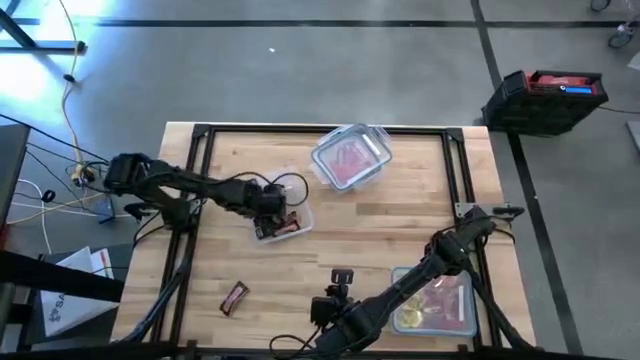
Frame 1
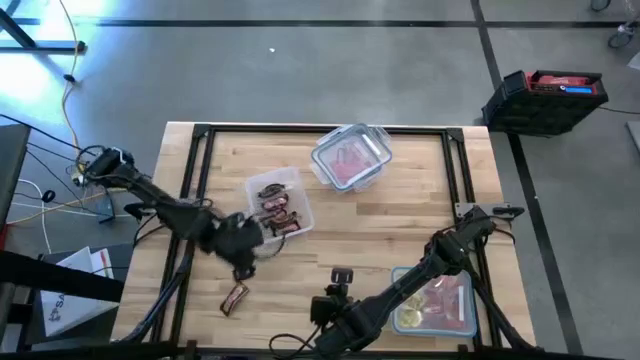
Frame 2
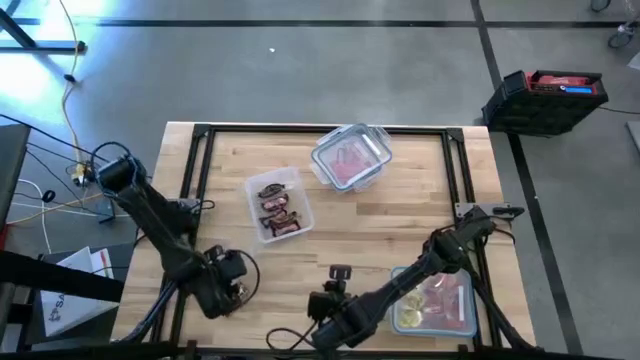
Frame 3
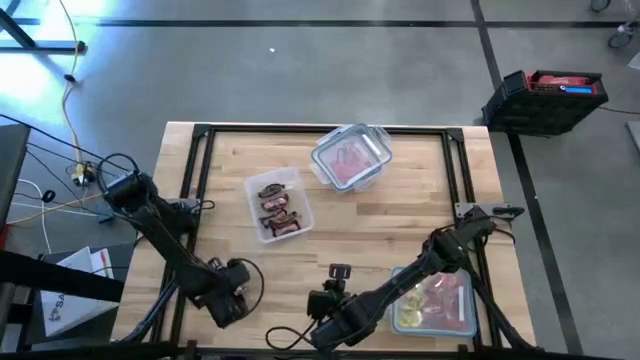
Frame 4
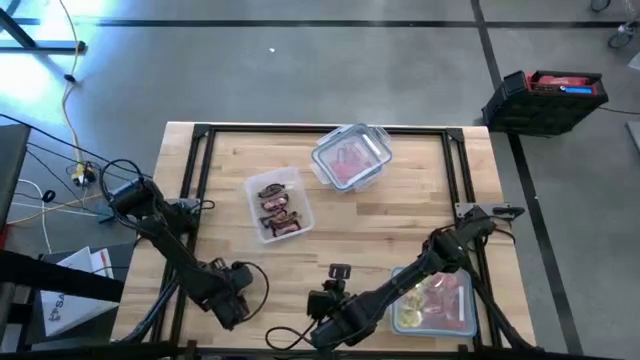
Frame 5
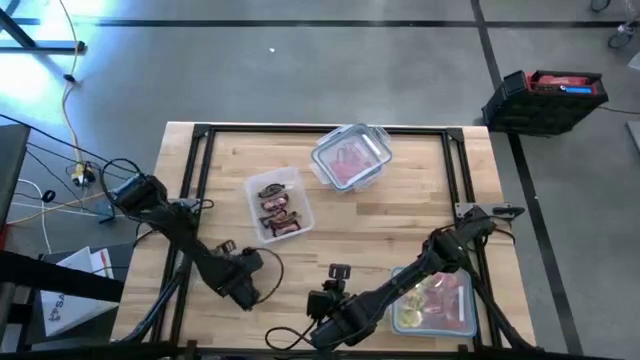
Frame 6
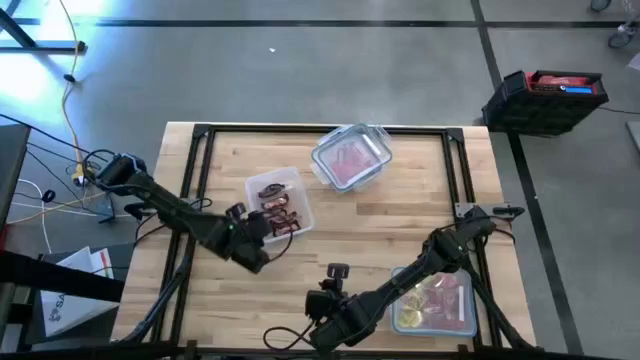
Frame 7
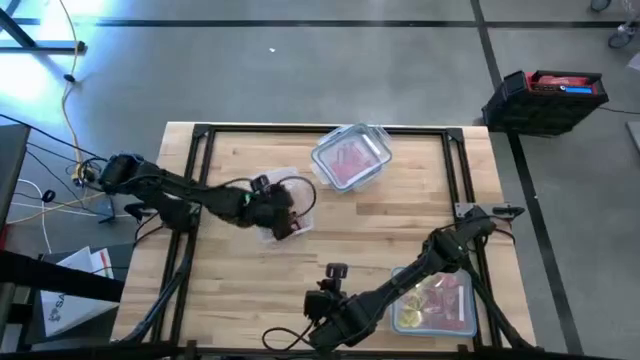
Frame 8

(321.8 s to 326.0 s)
Task: Sort candy
Put the brown chocolate bar into the transparent bin

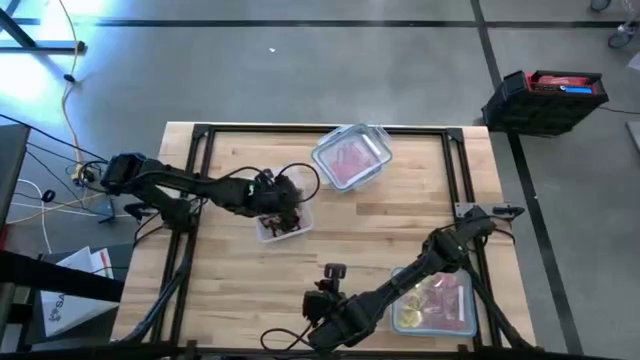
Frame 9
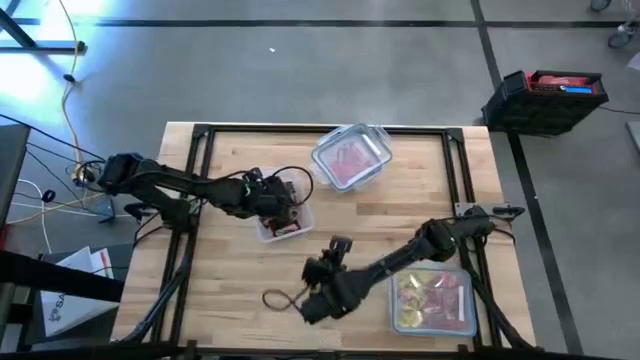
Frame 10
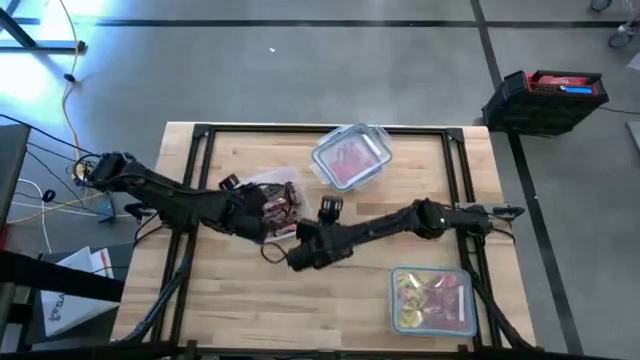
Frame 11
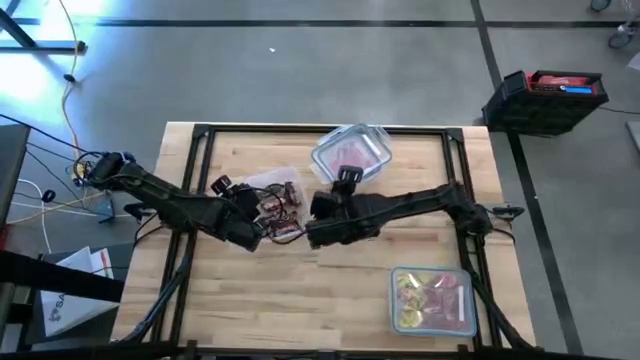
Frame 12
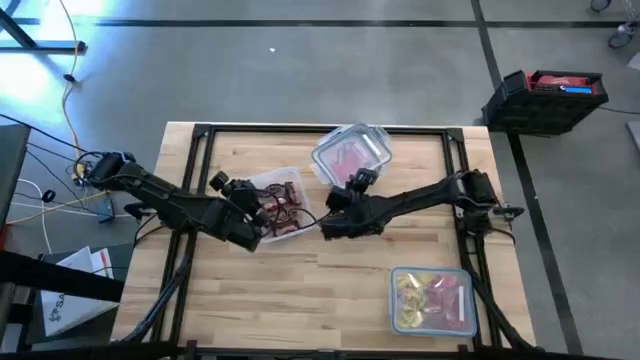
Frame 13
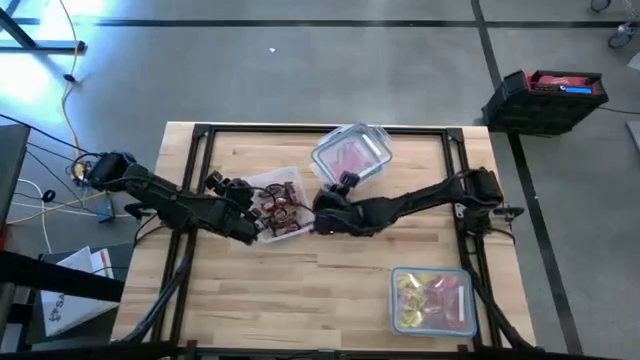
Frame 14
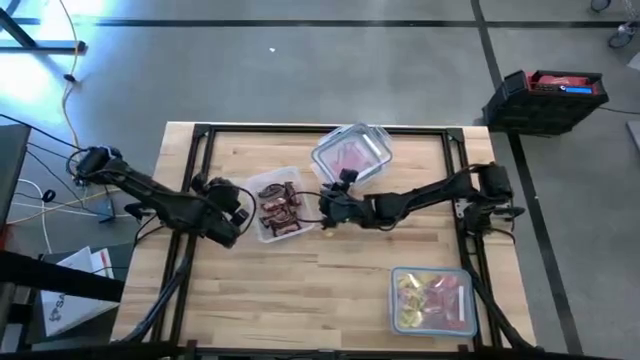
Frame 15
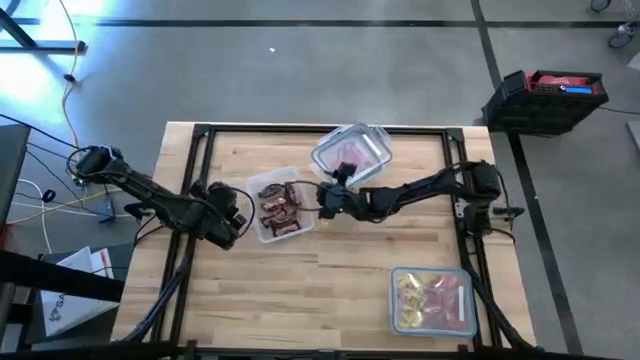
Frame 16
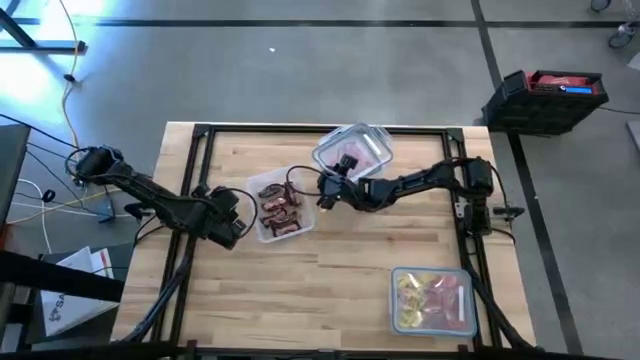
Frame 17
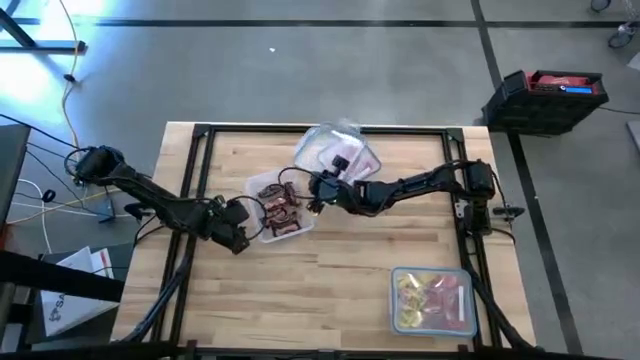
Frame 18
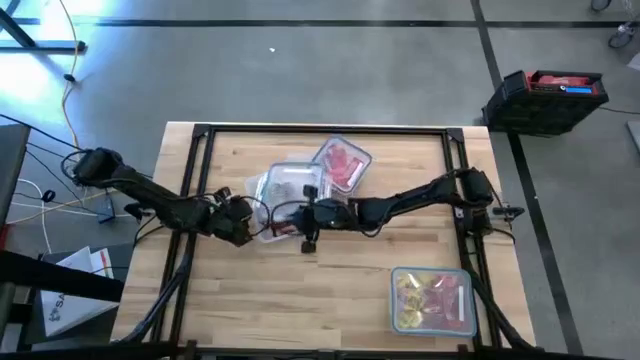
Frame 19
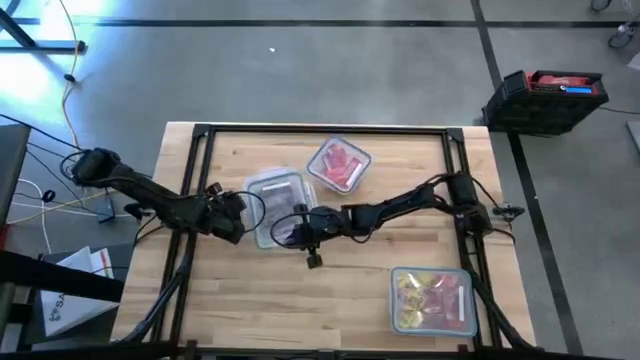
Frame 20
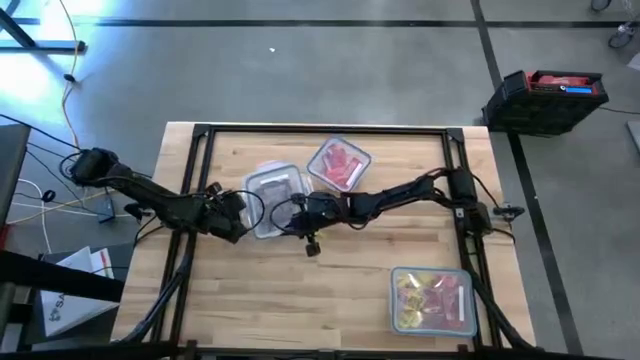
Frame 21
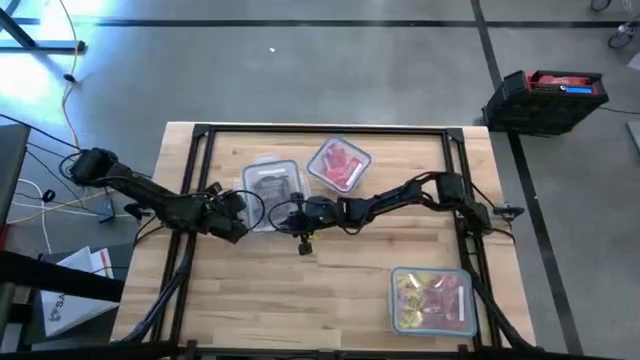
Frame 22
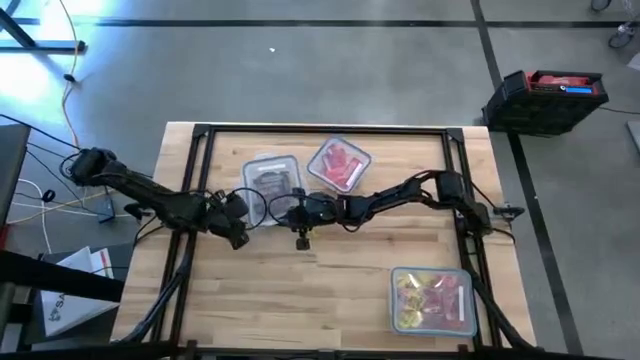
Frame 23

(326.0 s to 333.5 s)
Close the transparent bin

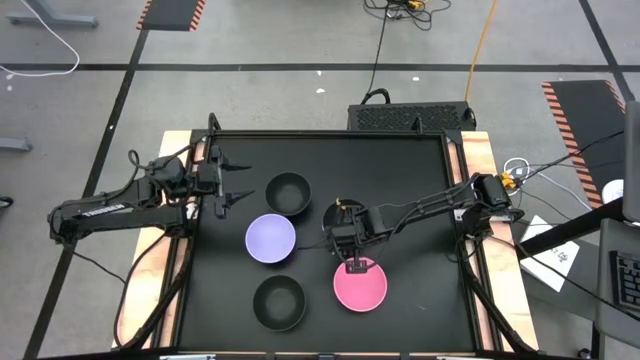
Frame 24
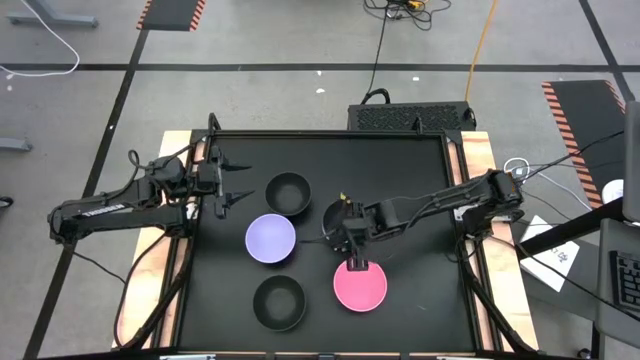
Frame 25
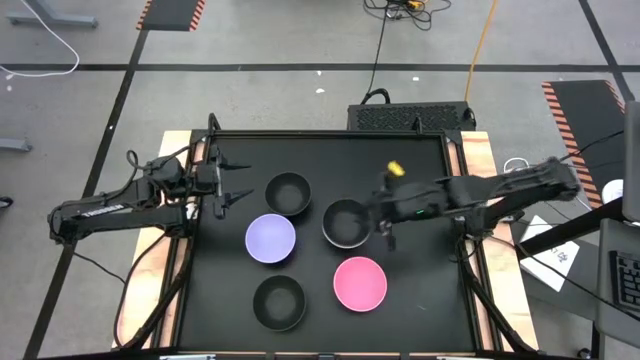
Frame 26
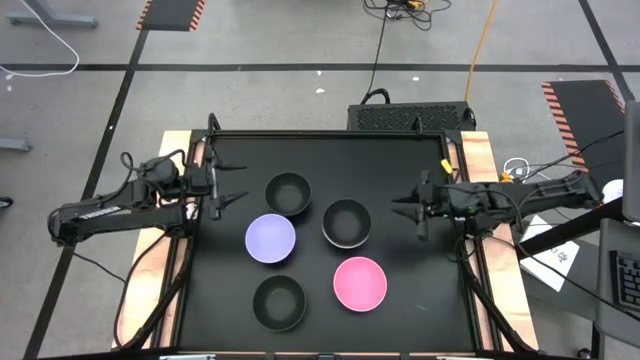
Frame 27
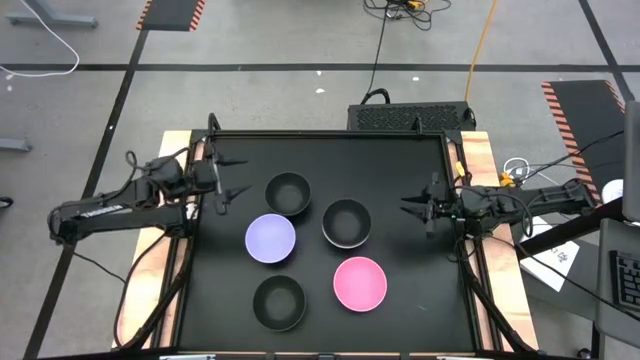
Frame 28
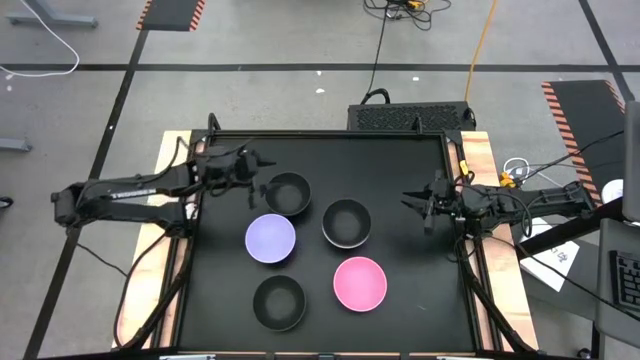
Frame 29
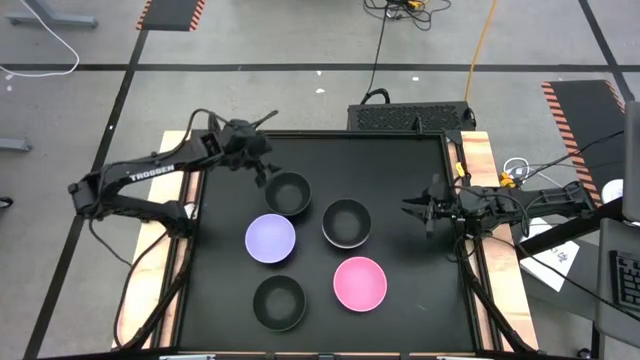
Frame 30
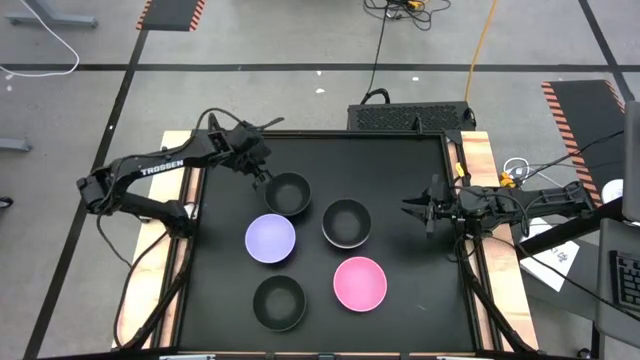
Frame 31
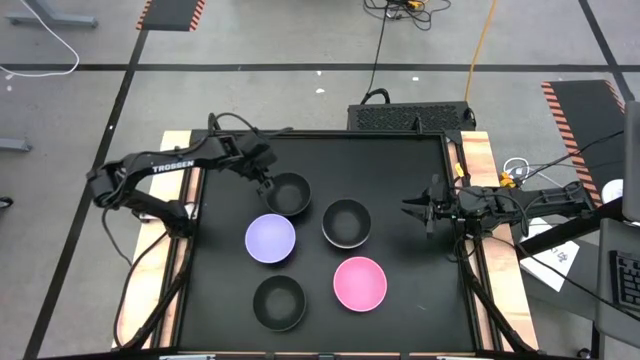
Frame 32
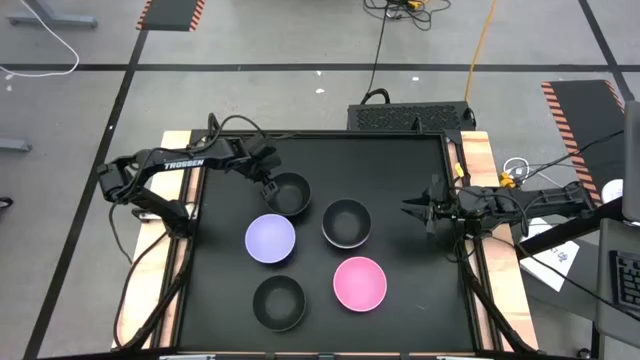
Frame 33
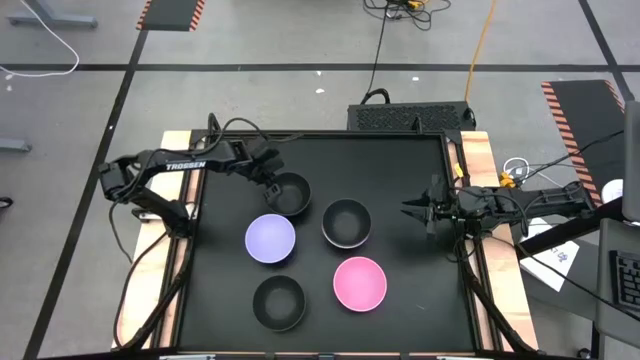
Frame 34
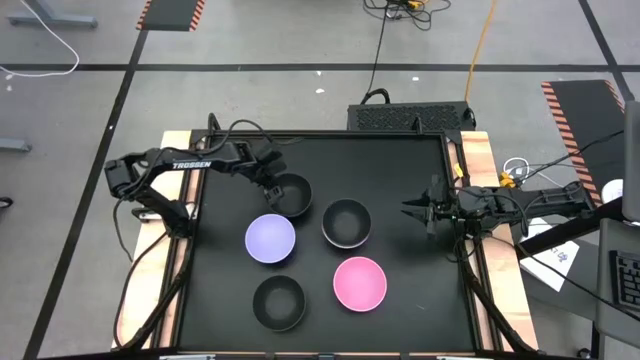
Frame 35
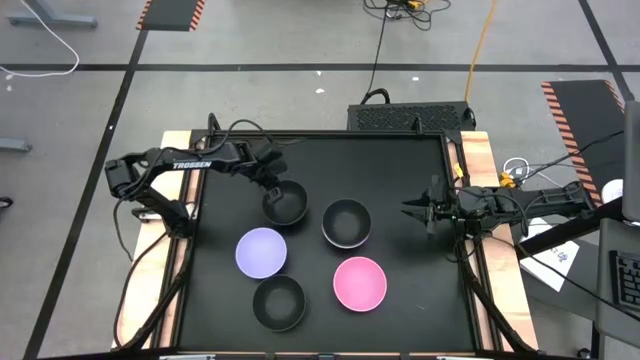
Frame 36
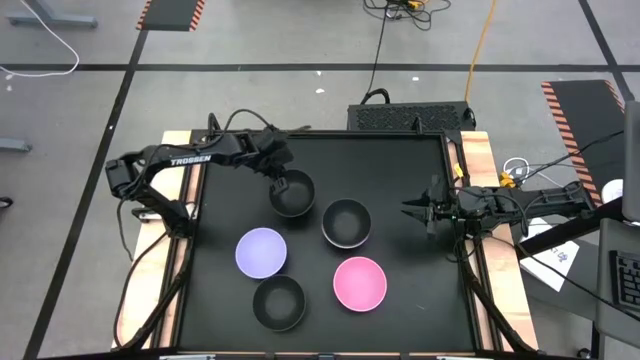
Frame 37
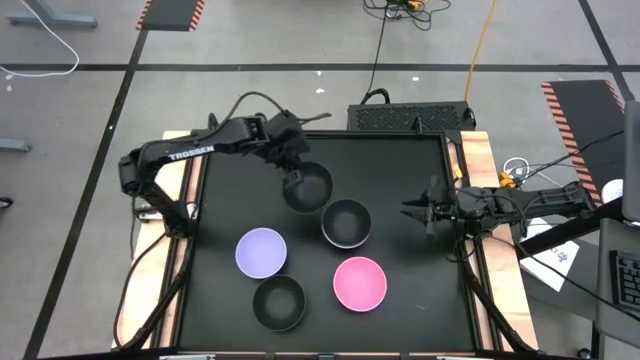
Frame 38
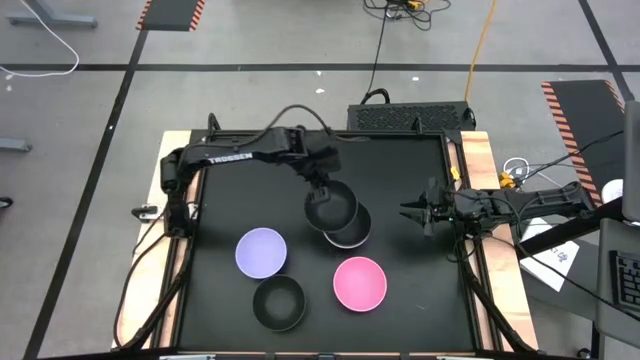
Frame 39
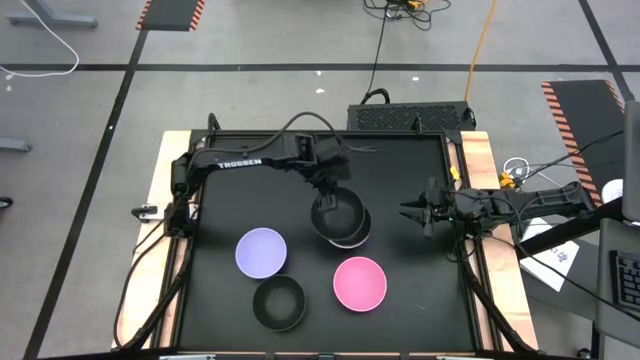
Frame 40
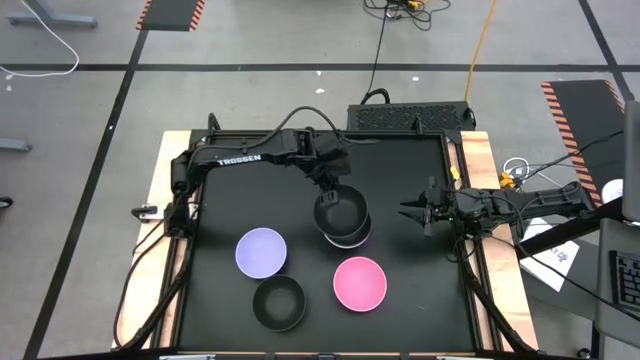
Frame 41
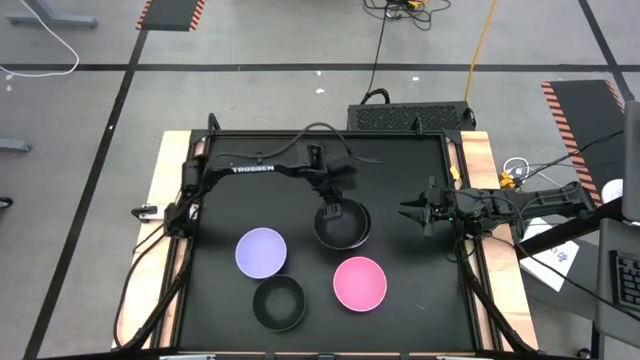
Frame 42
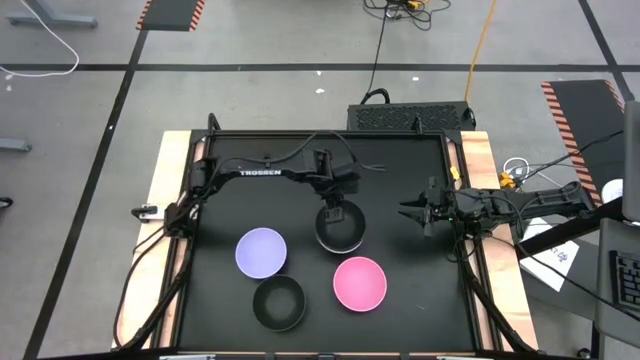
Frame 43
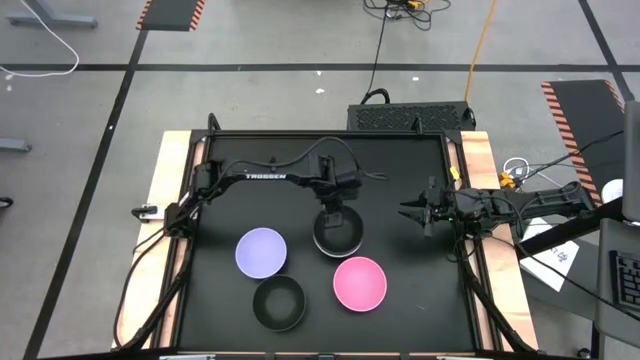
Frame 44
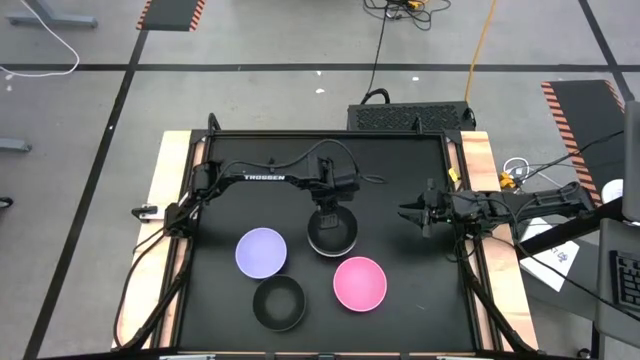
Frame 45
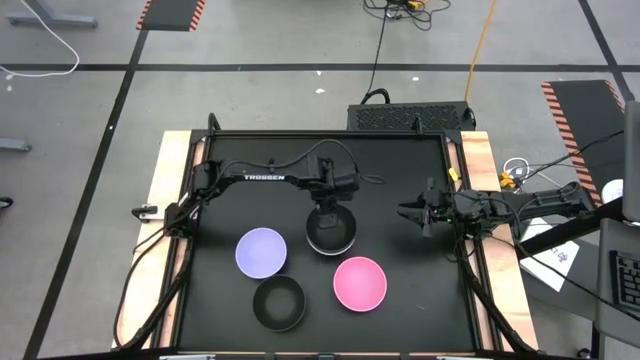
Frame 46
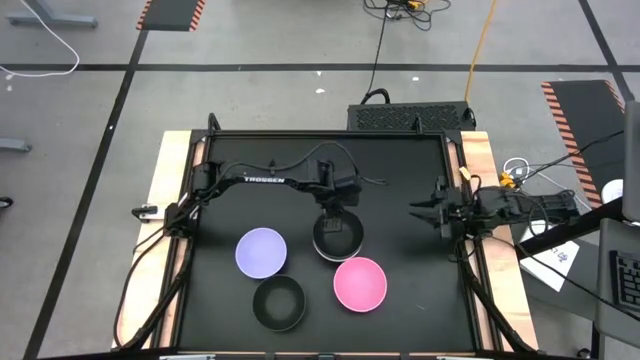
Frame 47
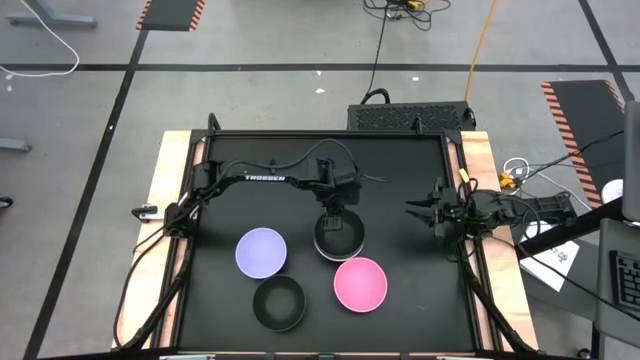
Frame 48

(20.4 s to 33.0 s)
Task: Nest bowls inside each other
Stack the top black bowl into the black bowl
